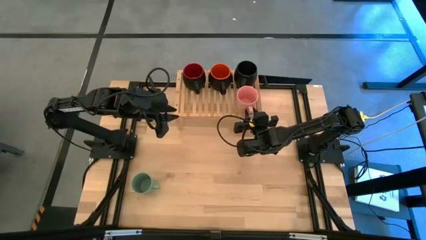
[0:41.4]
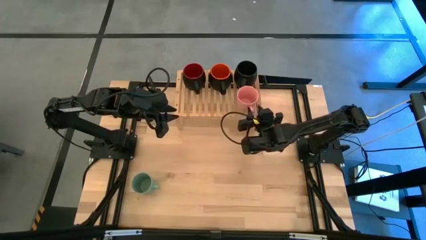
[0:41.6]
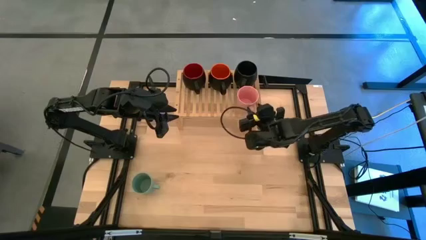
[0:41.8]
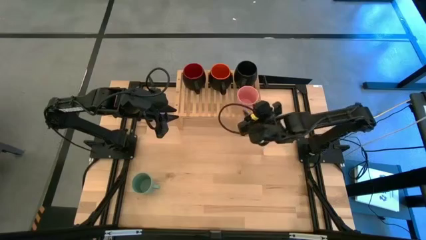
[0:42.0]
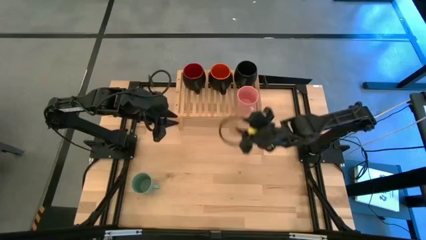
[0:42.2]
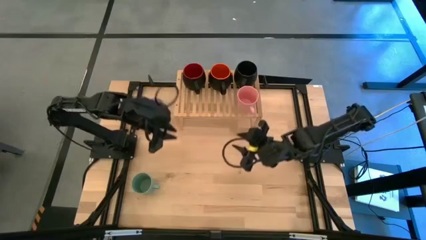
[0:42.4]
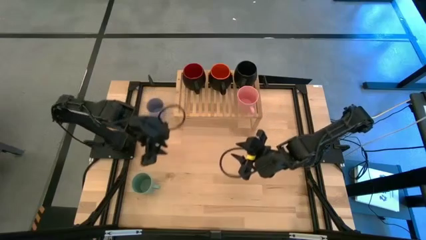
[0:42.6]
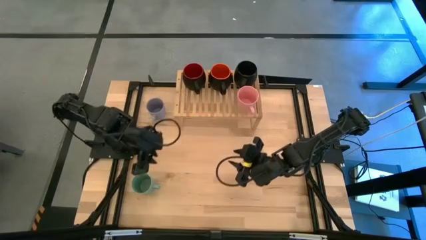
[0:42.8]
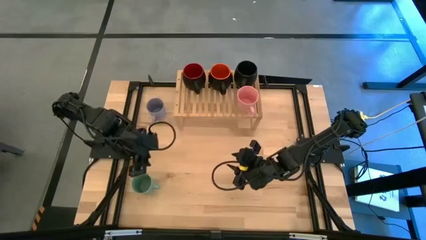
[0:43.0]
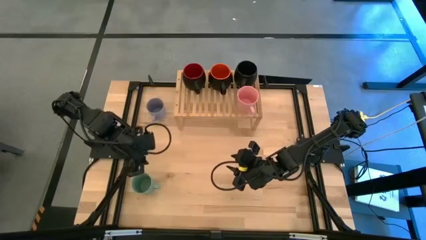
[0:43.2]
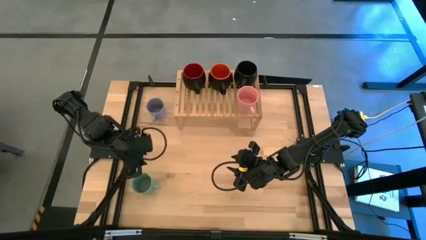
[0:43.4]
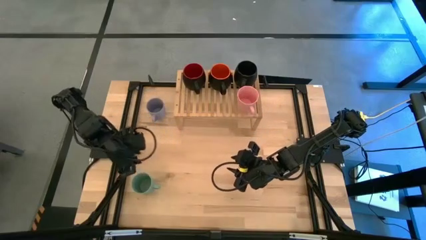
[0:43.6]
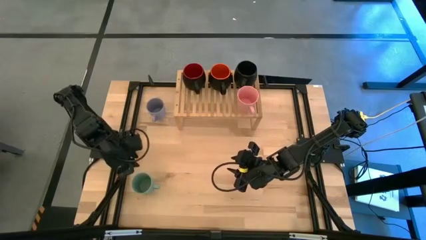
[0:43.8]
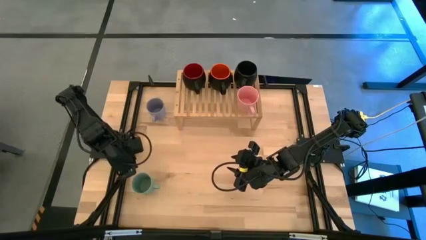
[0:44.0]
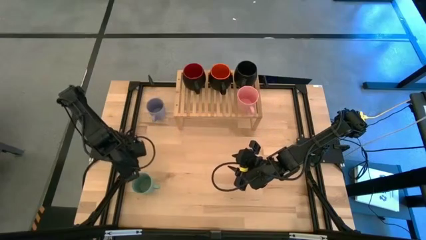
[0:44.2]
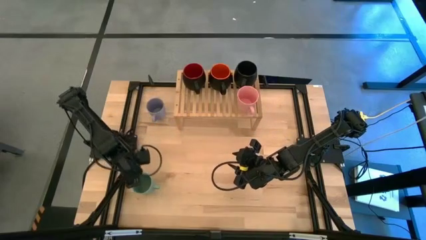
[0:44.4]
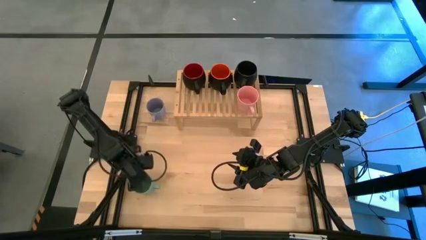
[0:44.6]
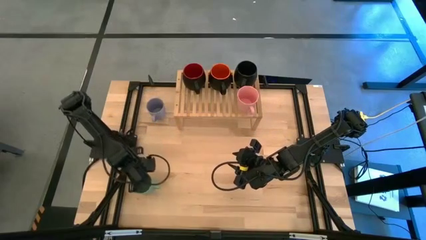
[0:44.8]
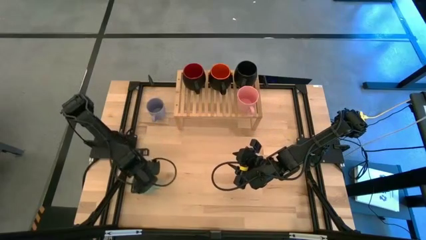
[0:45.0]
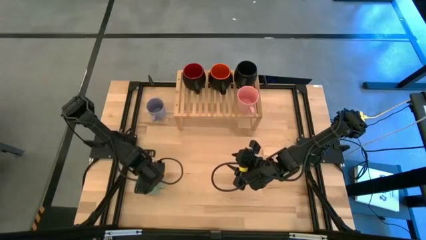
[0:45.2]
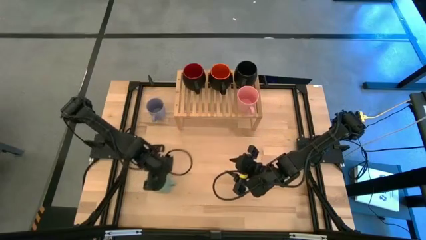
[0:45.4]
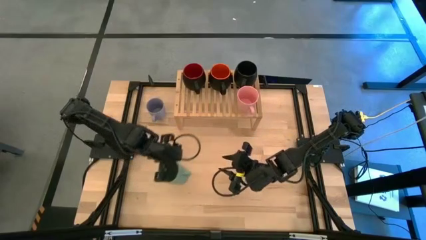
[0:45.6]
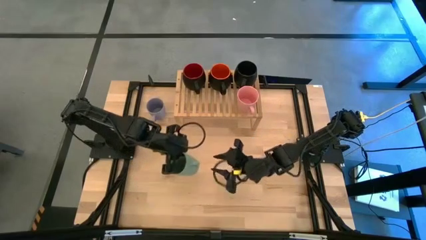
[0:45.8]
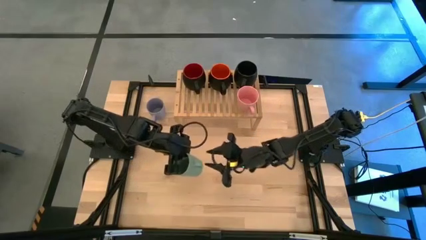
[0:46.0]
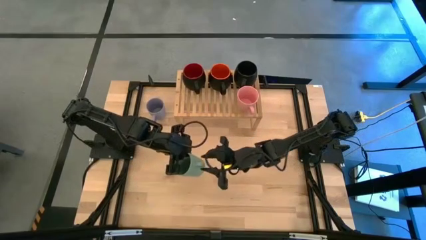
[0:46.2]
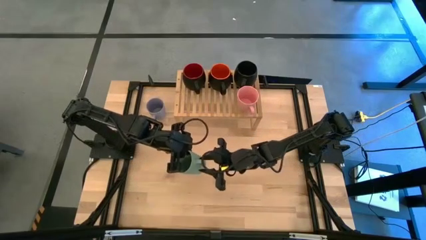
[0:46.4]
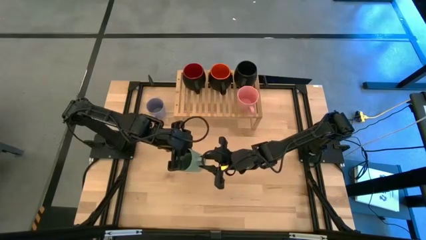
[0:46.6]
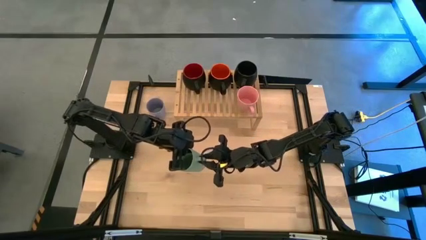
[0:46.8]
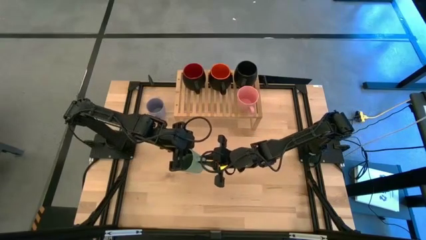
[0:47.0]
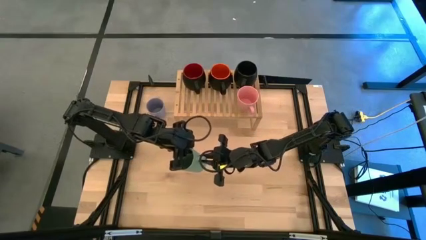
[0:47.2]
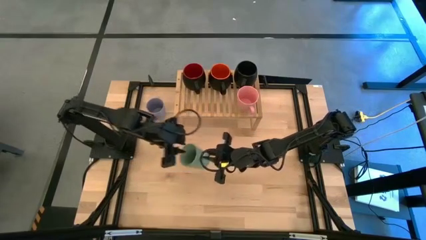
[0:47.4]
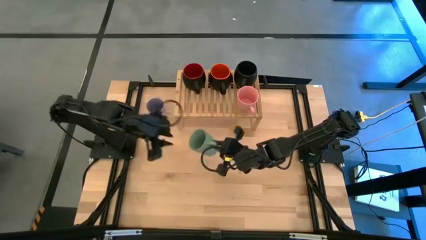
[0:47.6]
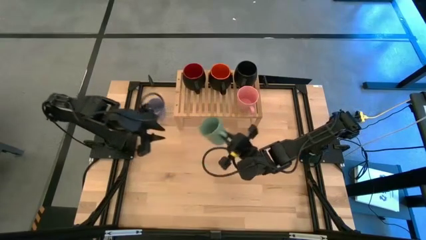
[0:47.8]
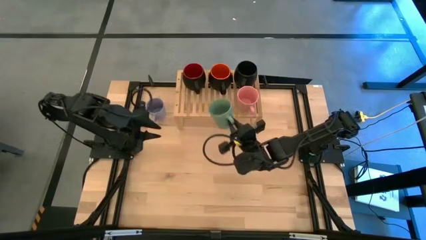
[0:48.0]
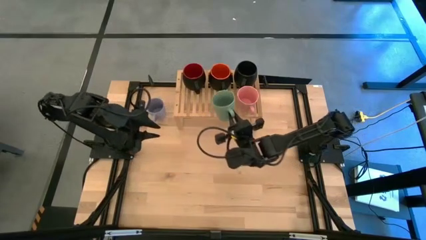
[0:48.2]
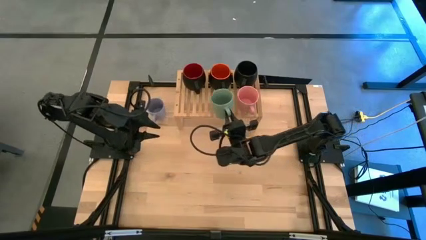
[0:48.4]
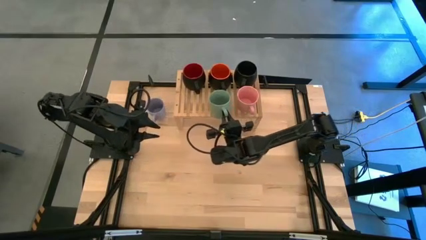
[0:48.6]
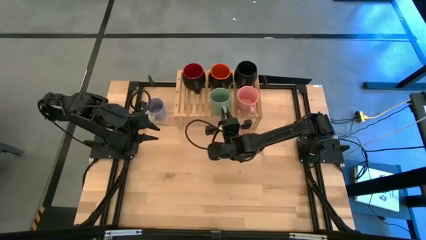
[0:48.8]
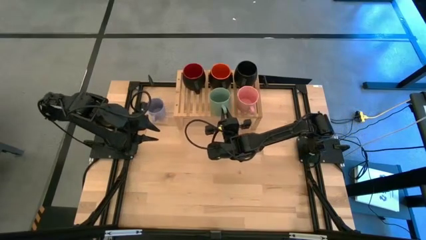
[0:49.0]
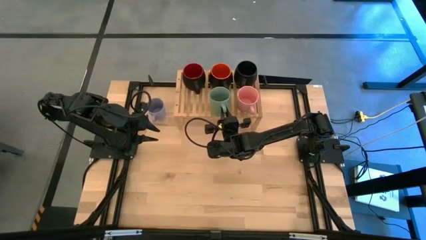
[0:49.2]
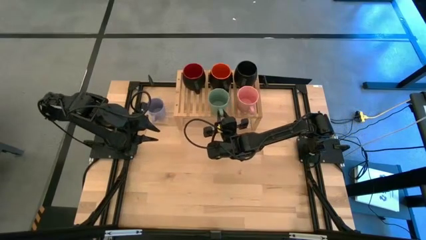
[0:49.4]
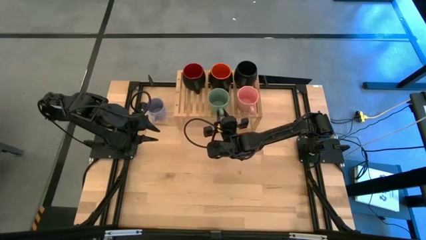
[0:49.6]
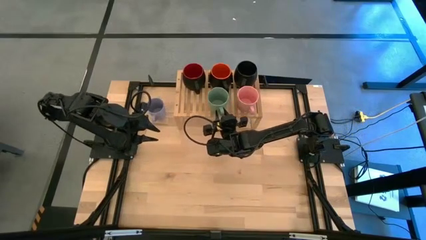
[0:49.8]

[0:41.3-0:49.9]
Task: Place coffee mugs
Put the green mug on the shelf

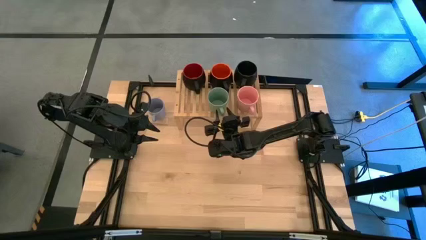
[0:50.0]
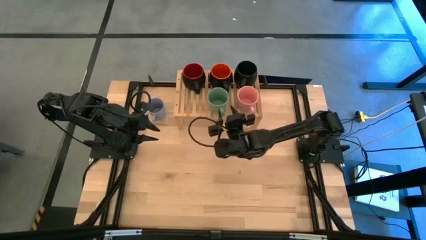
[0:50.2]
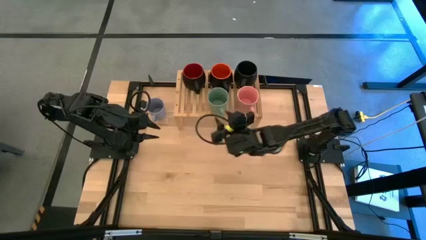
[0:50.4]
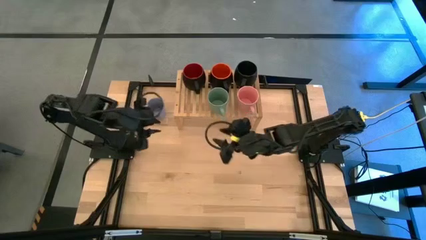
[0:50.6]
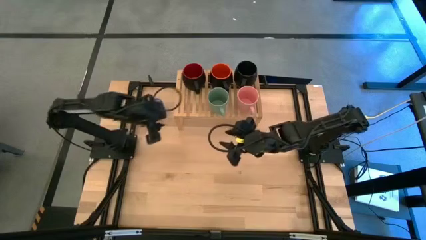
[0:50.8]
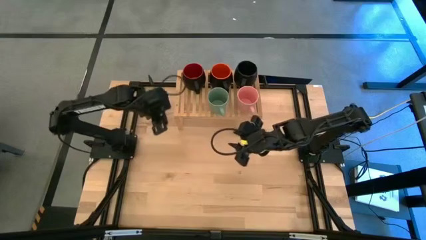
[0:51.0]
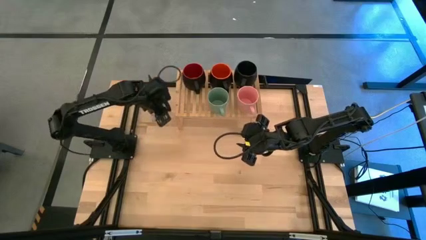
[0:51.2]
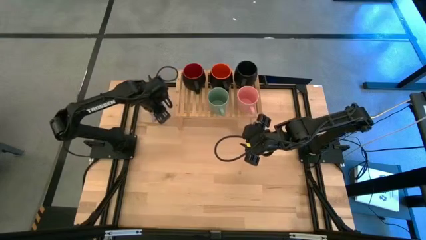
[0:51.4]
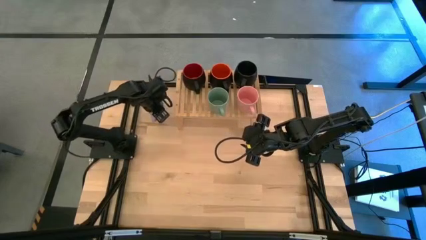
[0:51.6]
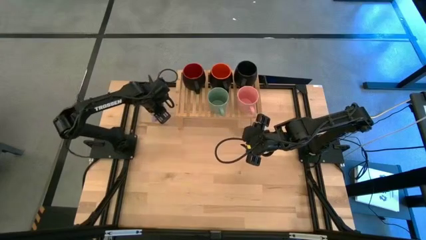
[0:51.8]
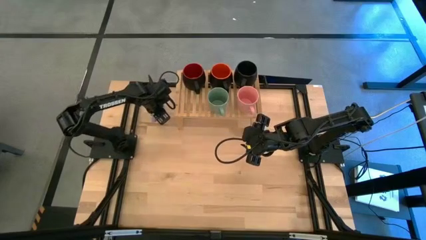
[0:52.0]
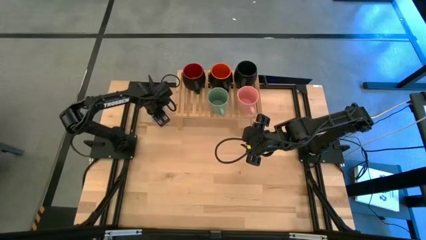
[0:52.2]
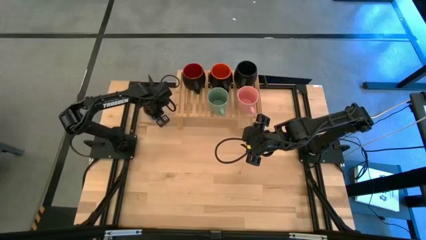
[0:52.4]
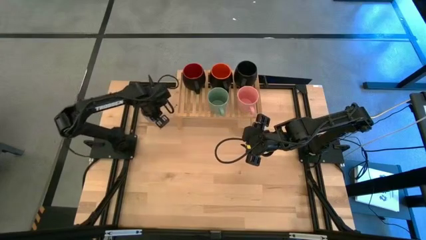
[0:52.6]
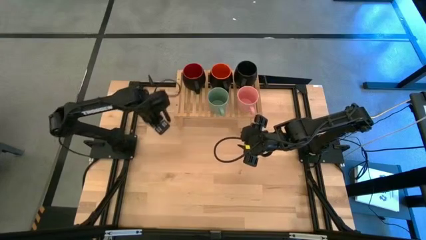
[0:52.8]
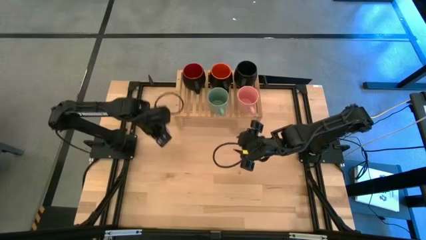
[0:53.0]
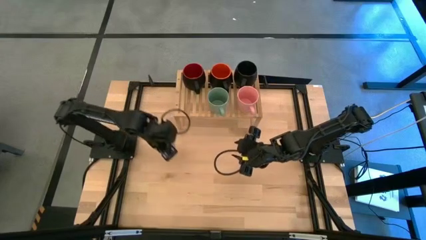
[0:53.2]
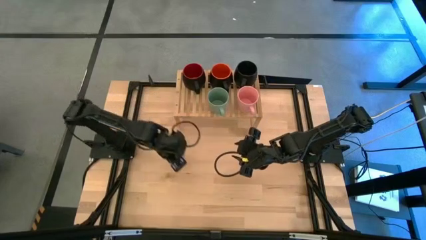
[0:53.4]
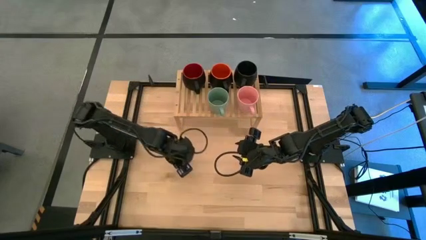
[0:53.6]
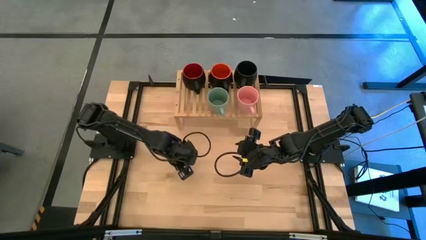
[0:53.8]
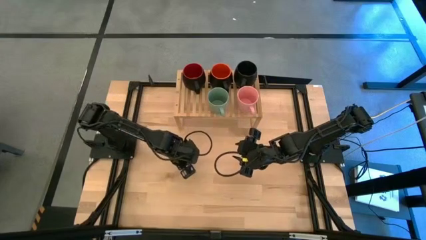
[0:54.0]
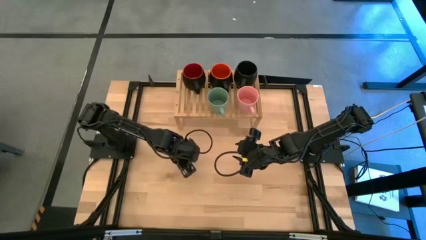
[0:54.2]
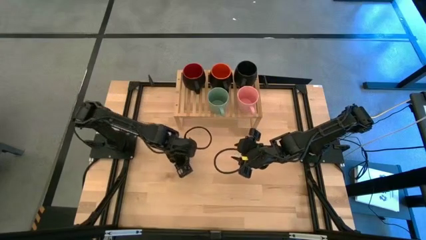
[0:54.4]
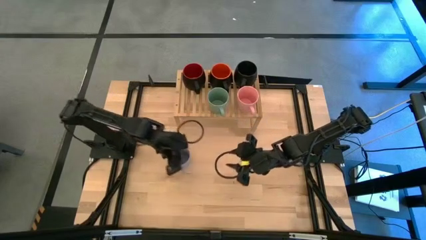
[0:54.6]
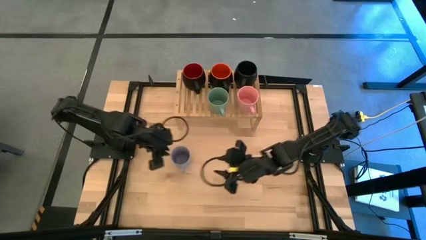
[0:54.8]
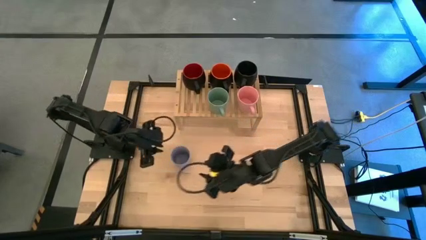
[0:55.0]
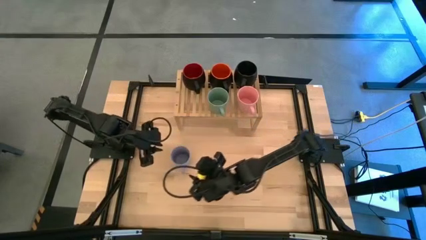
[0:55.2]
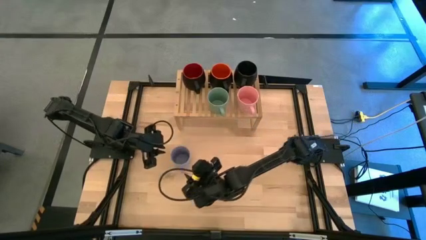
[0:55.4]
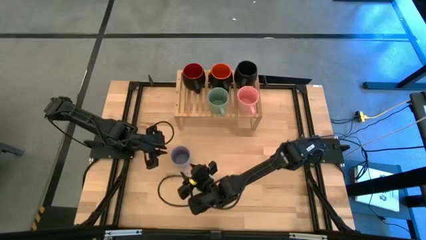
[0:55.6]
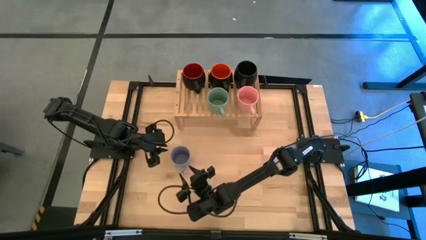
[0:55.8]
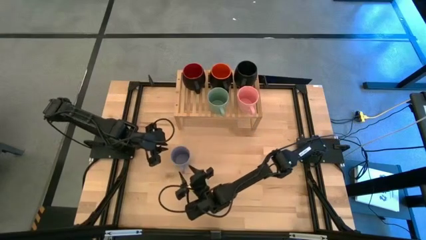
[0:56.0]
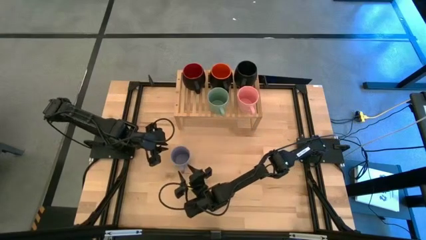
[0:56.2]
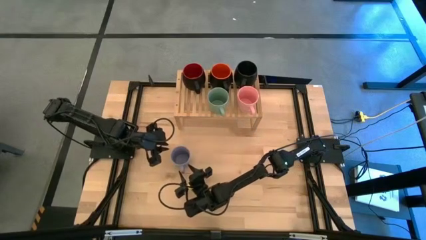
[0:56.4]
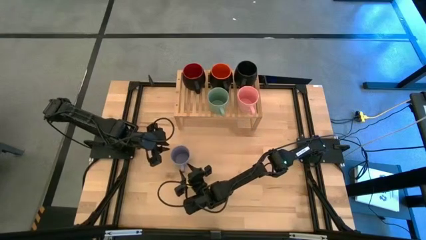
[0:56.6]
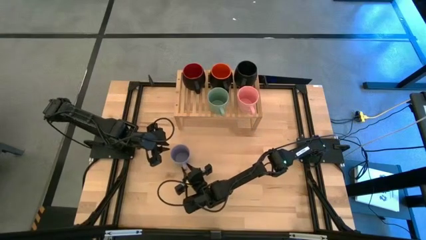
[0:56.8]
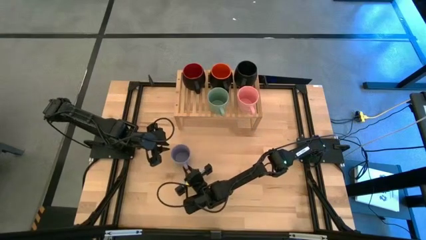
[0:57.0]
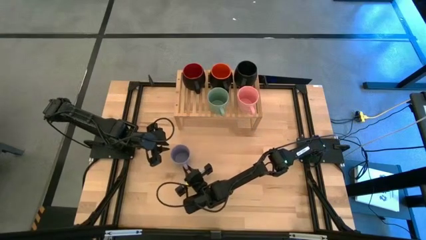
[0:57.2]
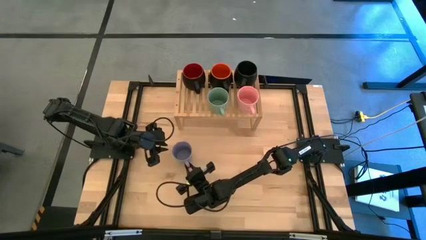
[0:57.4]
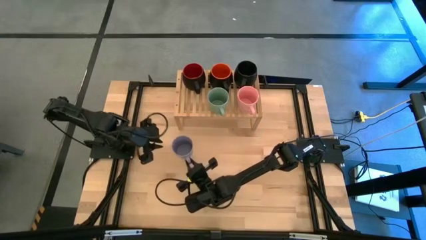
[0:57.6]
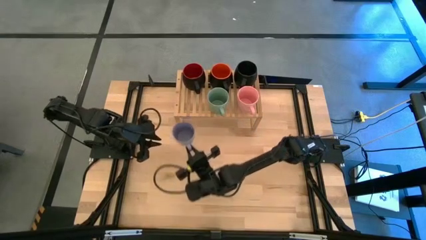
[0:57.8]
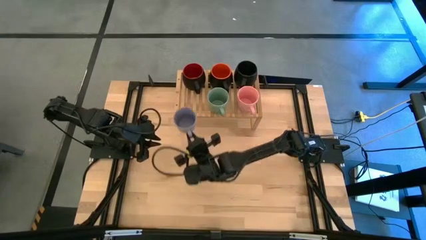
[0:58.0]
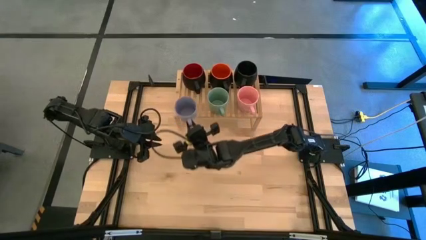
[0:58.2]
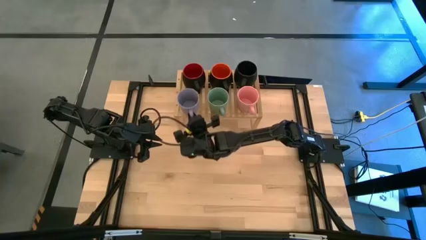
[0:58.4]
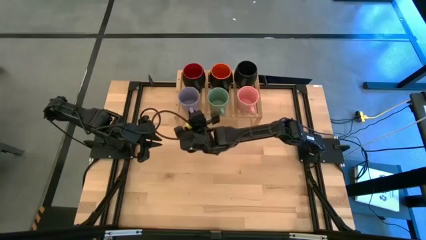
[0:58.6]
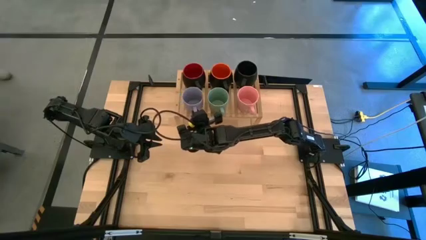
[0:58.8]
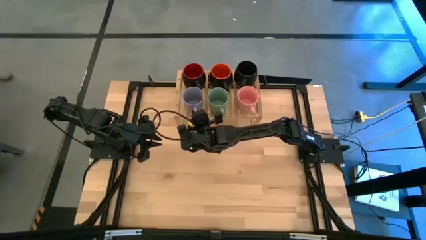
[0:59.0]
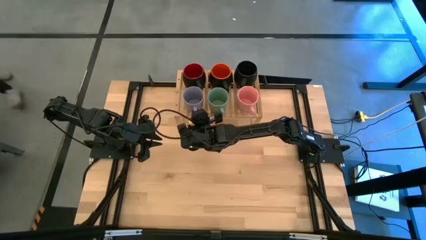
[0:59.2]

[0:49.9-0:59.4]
Put the purple mug on the shelf
